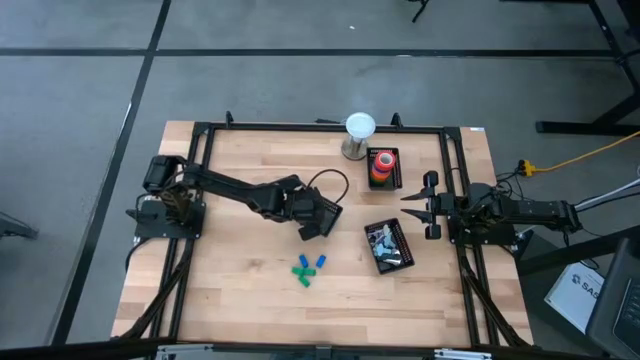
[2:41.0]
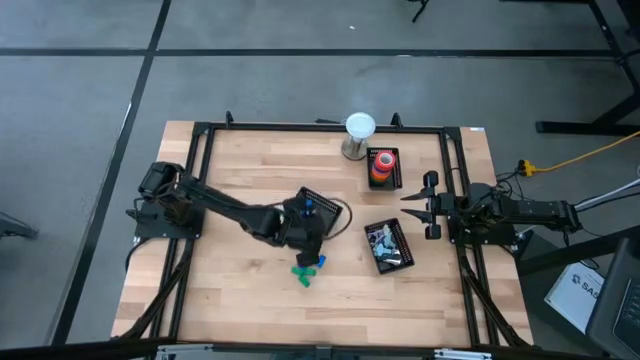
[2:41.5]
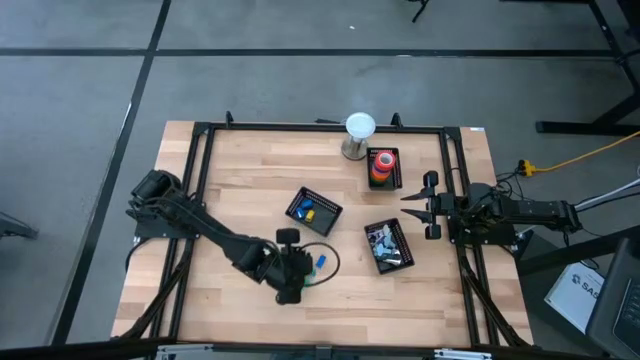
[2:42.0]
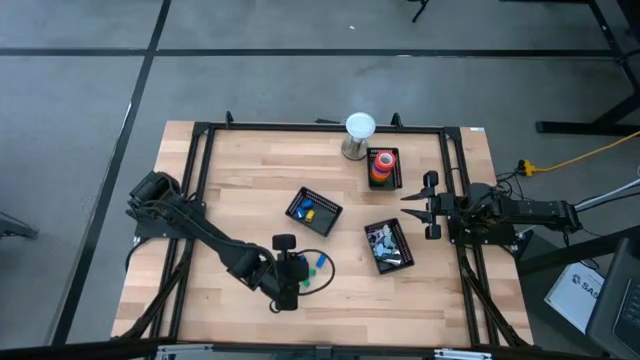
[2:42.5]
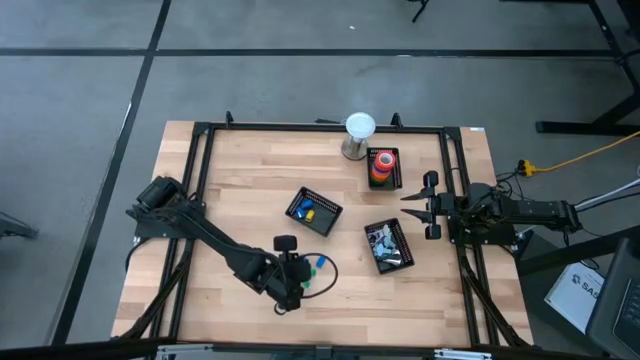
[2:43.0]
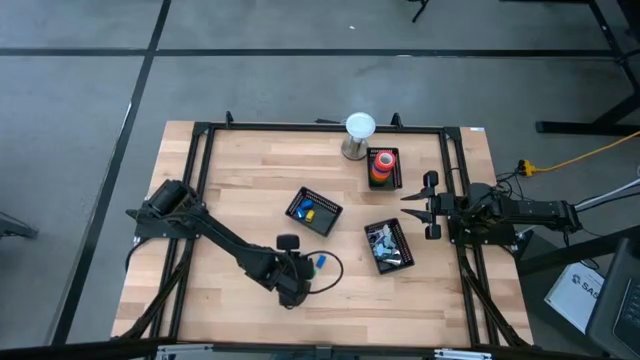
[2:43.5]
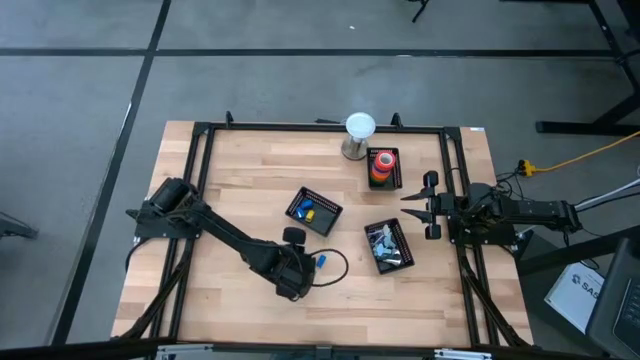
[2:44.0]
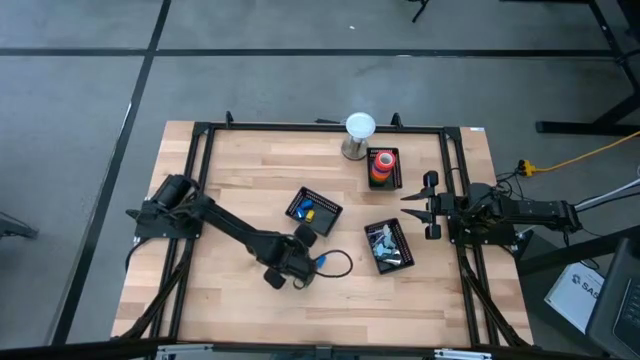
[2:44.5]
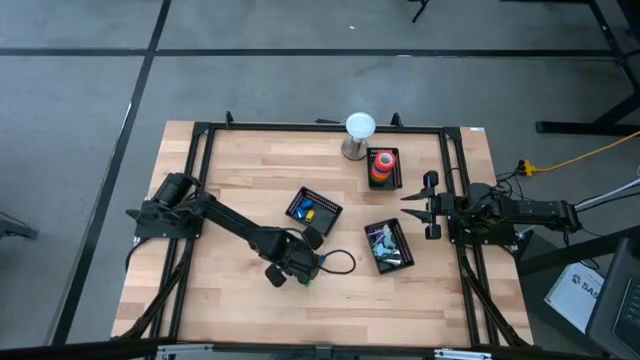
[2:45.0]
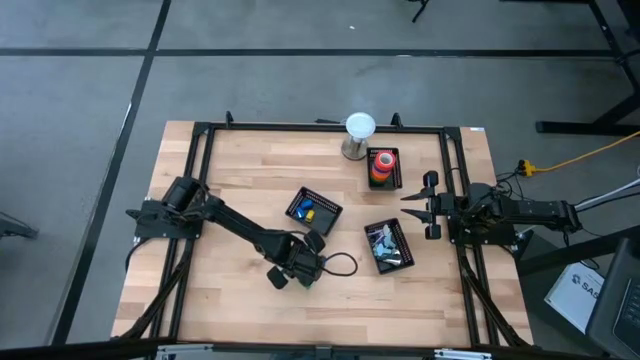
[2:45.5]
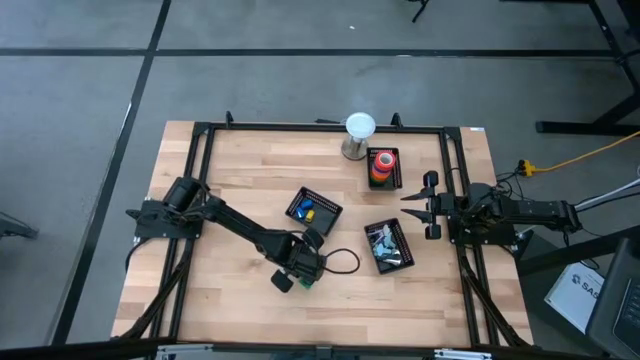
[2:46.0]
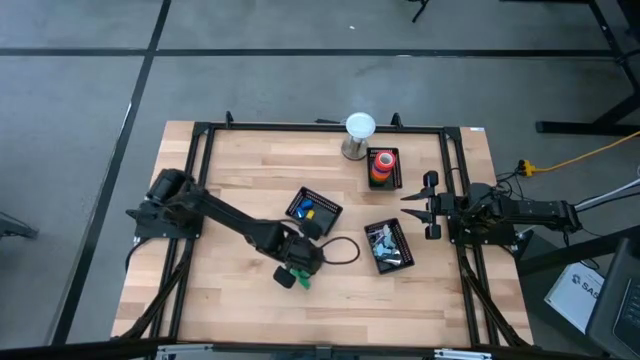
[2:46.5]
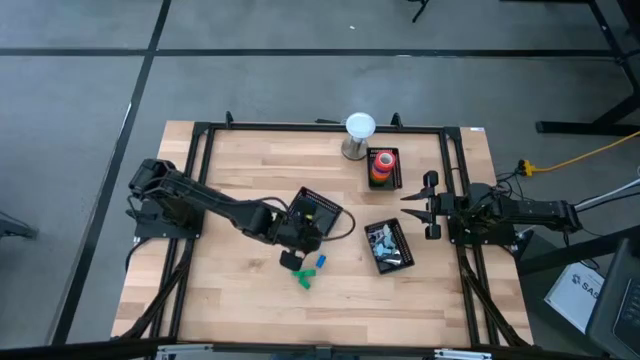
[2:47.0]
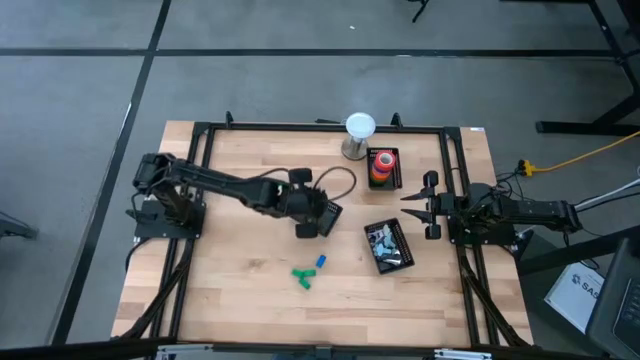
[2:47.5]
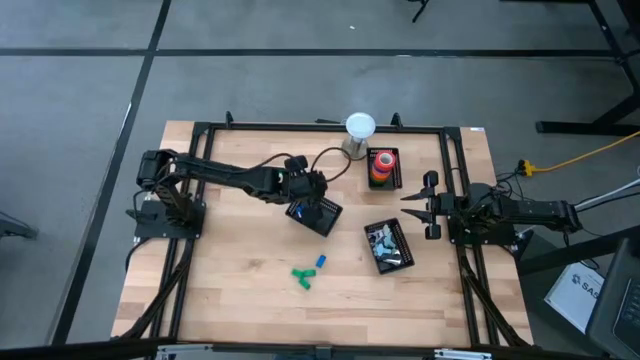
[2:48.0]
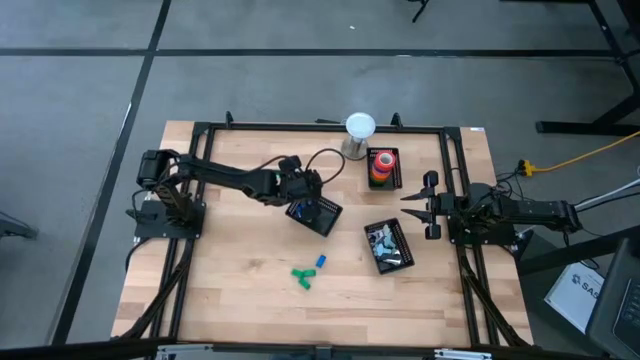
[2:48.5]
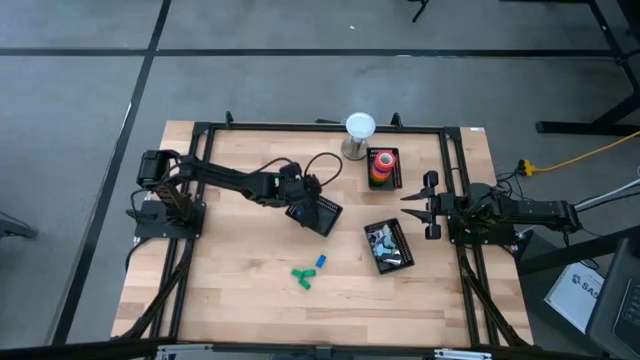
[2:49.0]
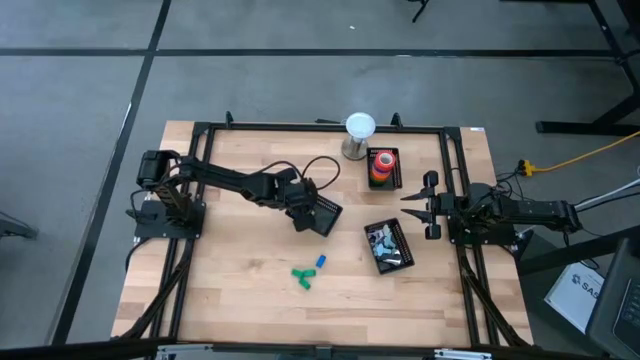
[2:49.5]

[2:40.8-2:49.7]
Task: Pick and place Stapler, Stapler remover, tape
Put the blue stapler into the center black bin

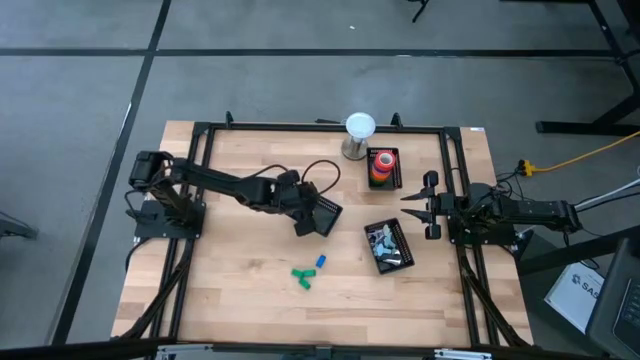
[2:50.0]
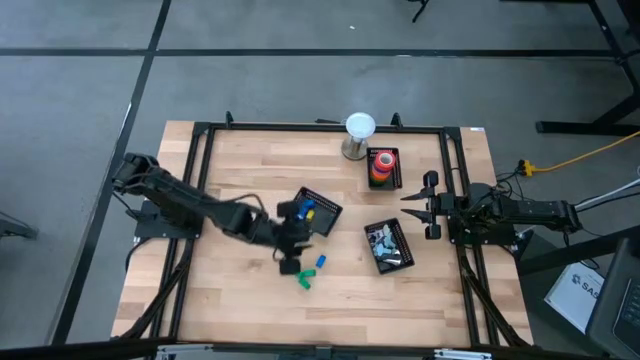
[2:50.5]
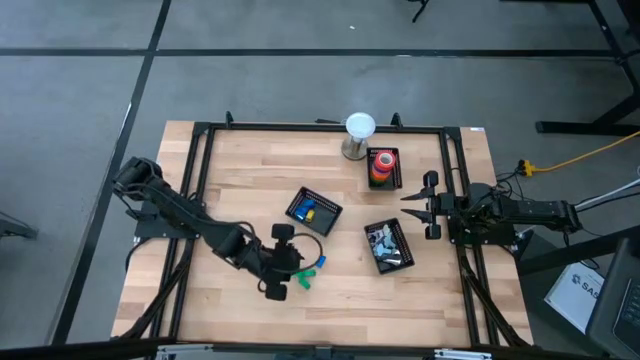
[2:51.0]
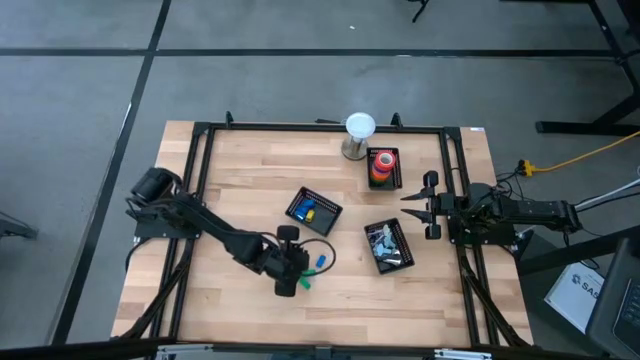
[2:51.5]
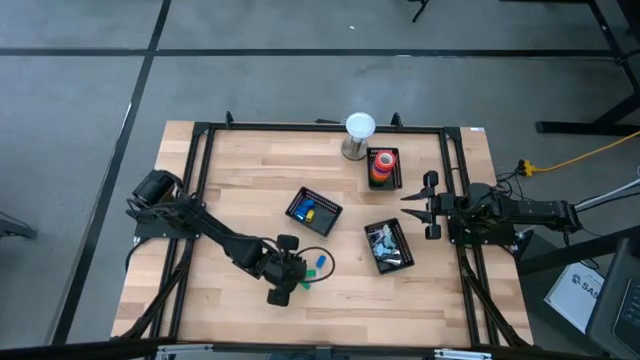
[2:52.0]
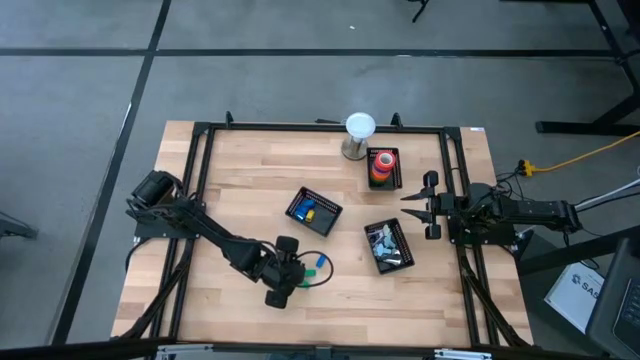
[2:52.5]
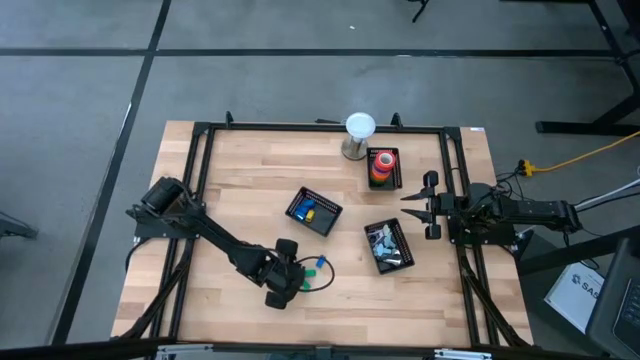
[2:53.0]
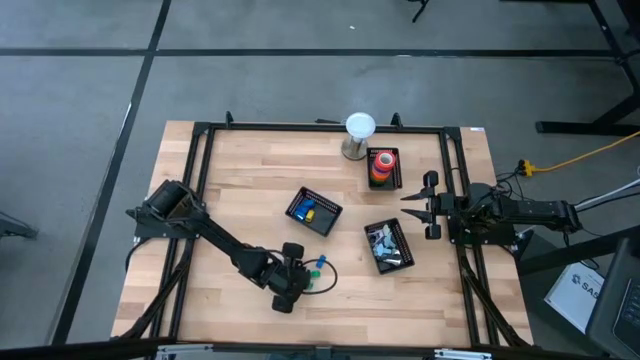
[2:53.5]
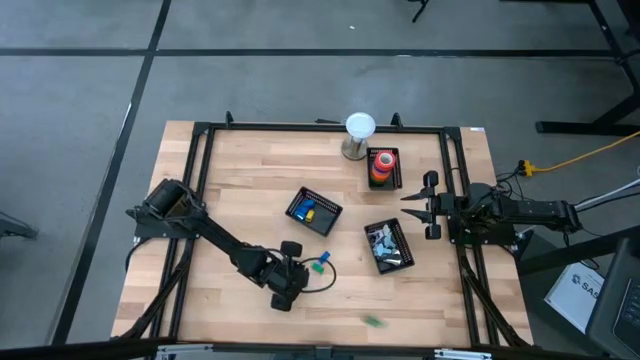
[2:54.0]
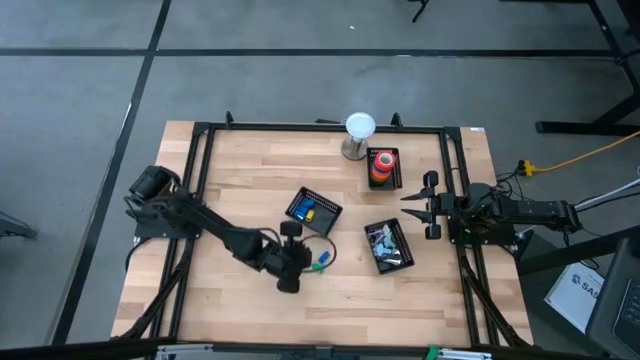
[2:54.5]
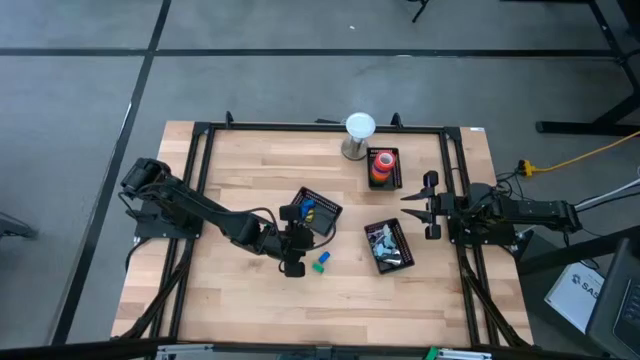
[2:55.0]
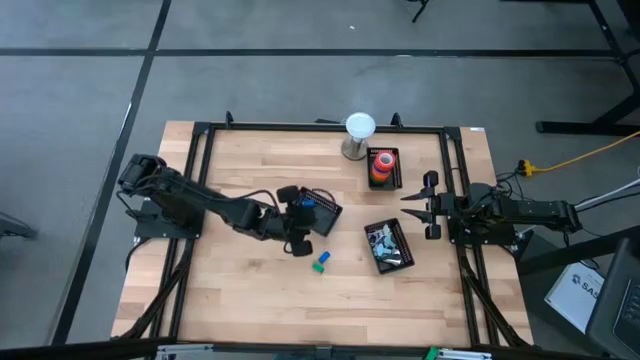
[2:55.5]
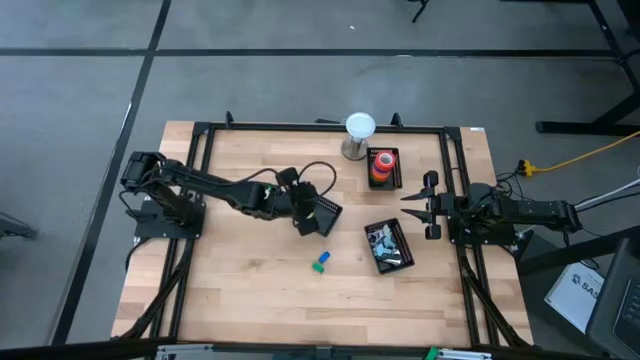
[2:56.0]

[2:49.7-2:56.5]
Put the green stapler into the center black bin

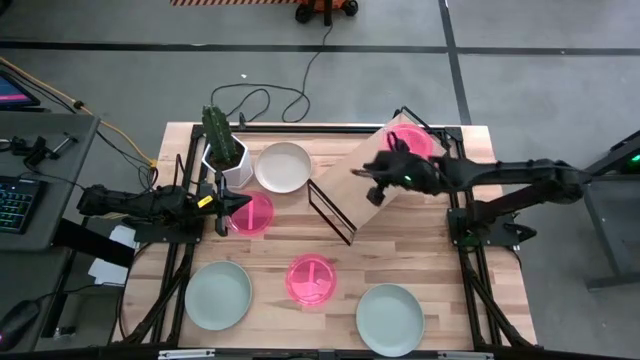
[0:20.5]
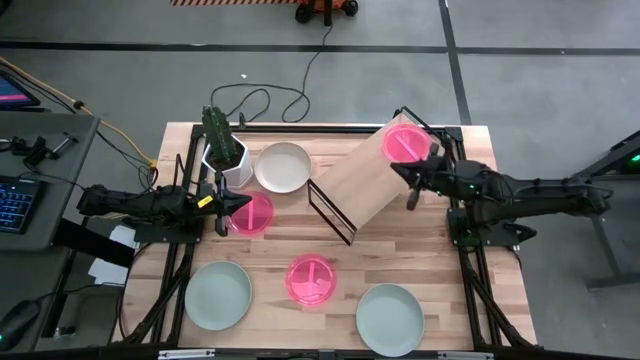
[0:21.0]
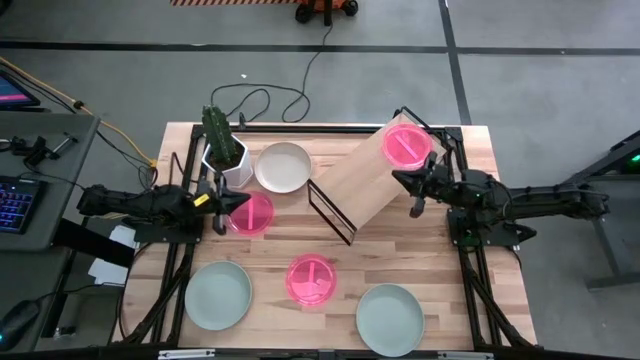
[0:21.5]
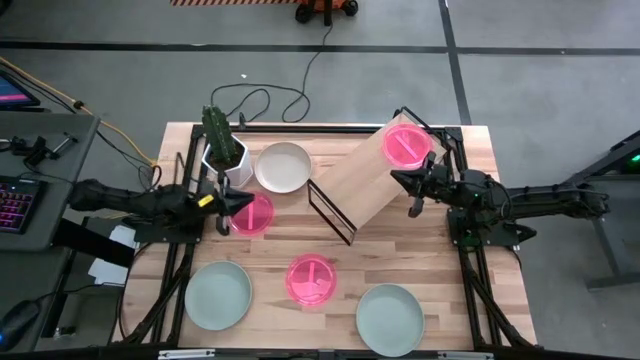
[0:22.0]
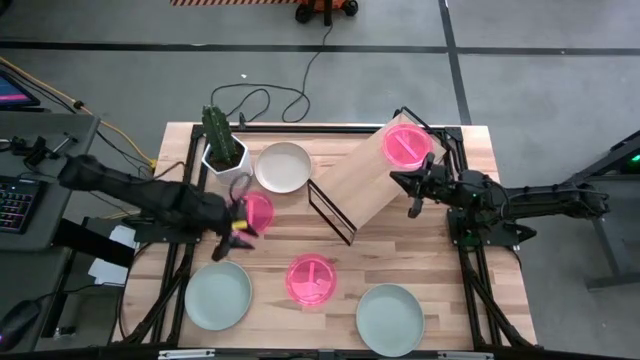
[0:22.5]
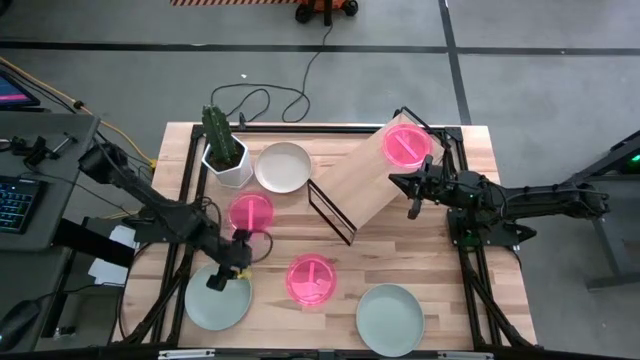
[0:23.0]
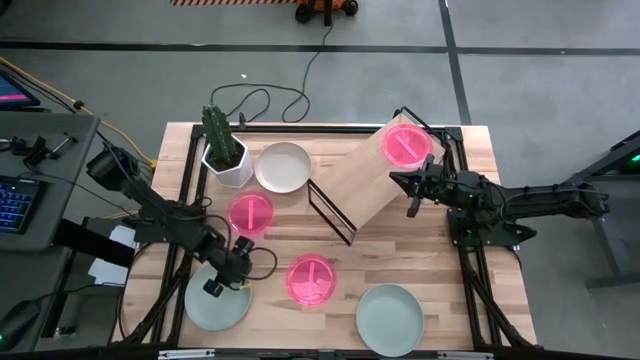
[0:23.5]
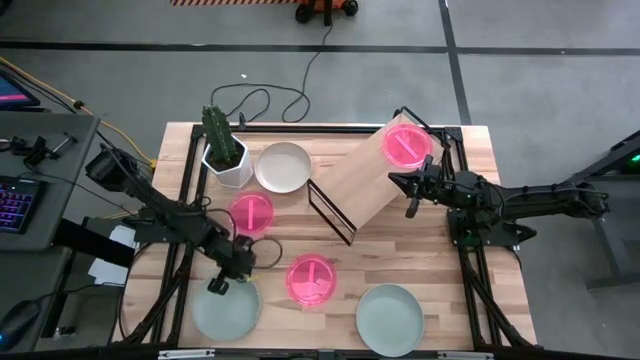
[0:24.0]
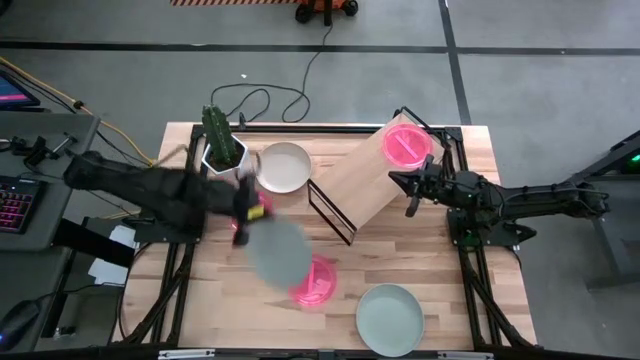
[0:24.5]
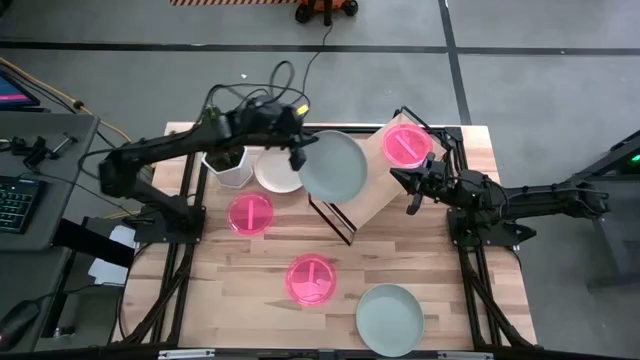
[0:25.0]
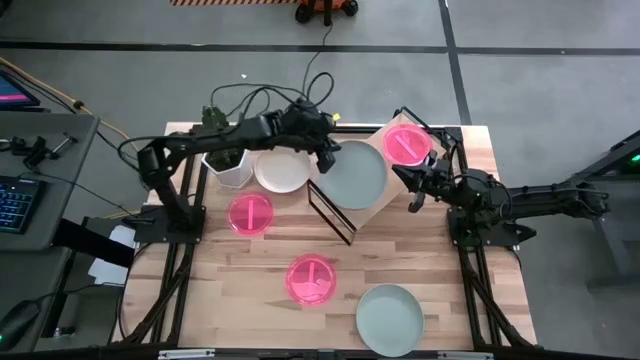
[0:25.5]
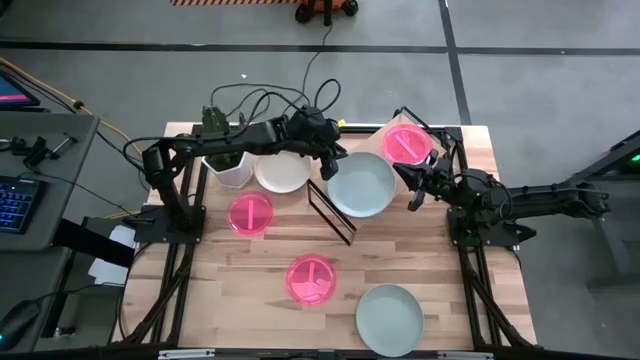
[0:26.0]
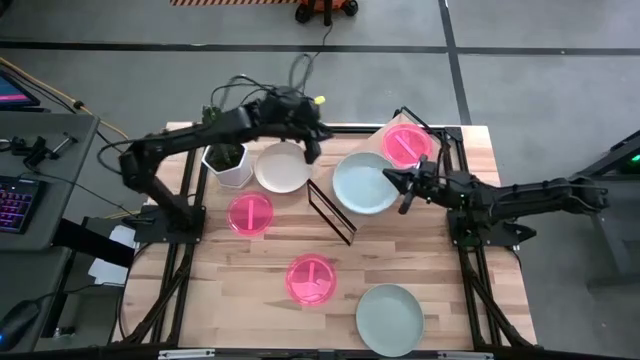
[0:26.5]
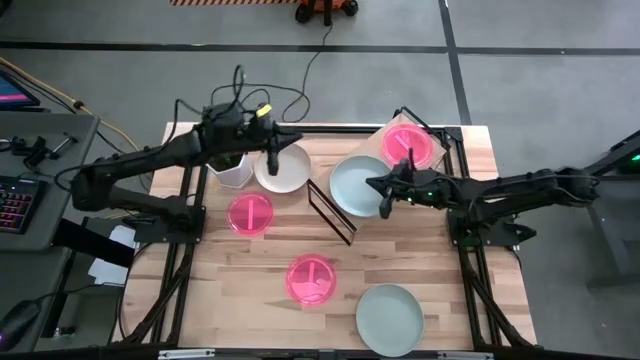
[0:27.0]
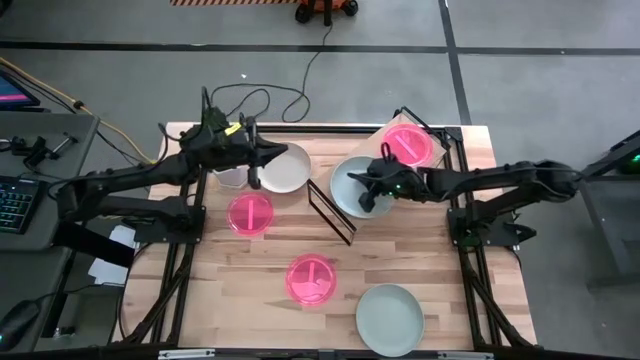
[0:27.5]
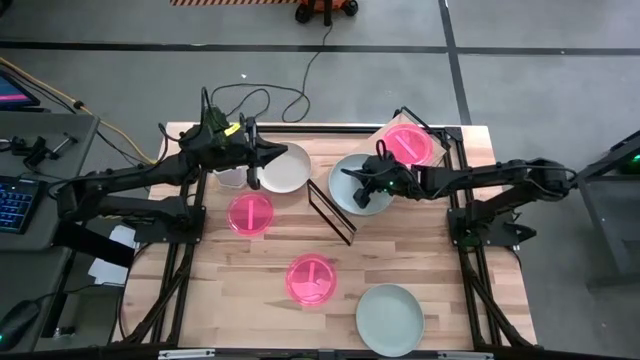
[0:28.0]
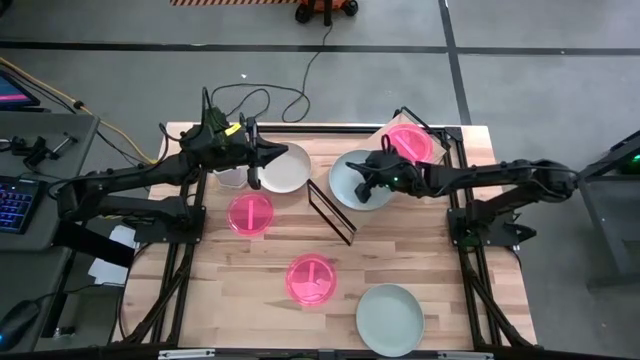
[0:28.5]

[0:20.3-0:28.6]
Task: Place and stack plates onto a shelf
Put the left blue plate on the shelf
